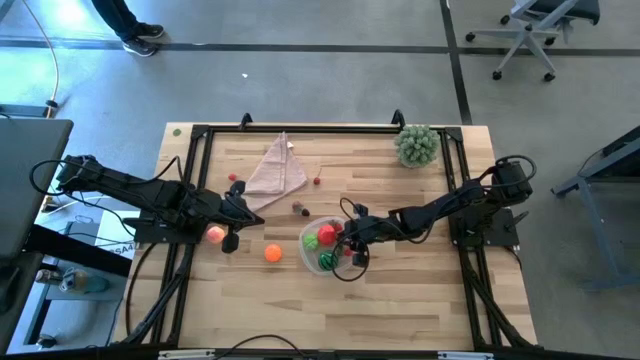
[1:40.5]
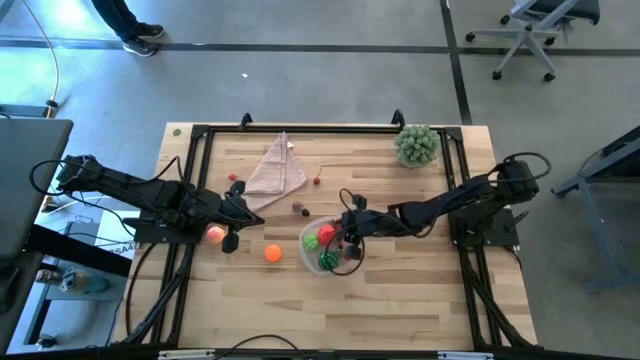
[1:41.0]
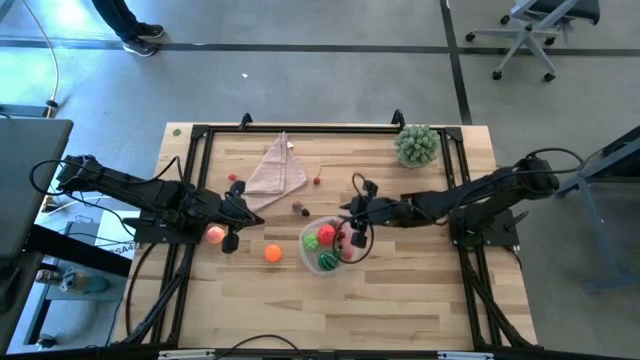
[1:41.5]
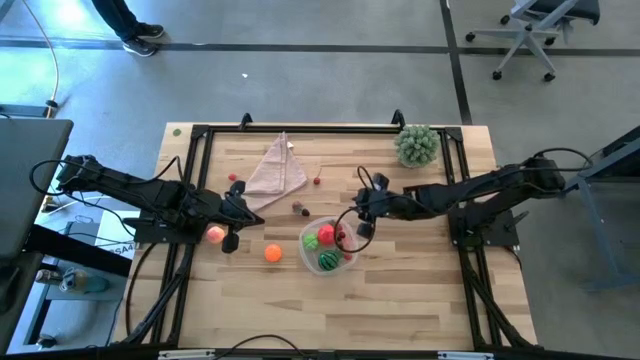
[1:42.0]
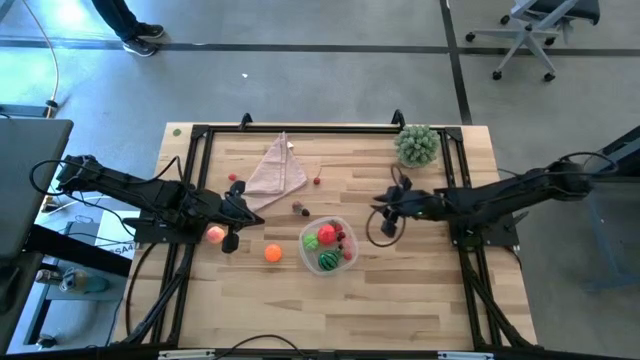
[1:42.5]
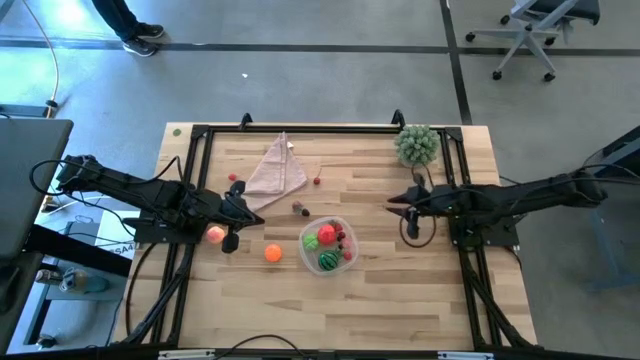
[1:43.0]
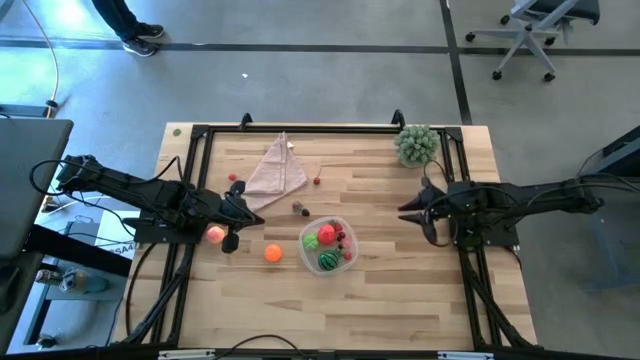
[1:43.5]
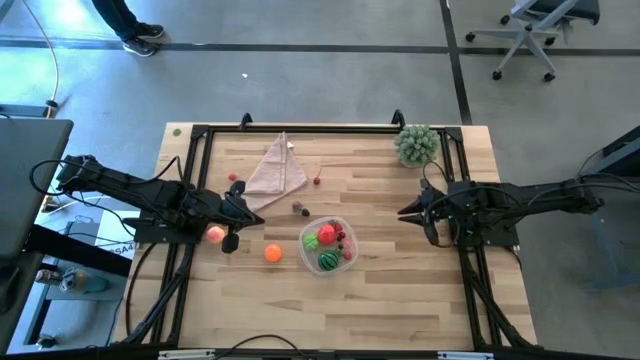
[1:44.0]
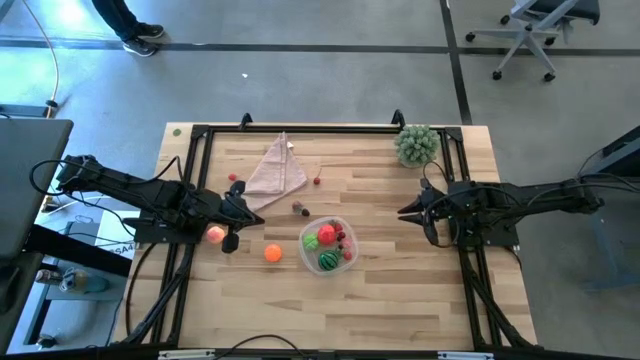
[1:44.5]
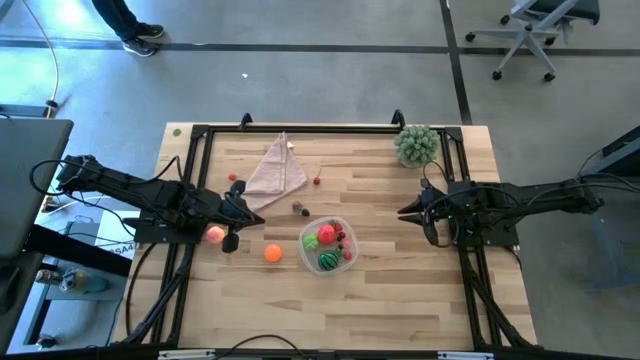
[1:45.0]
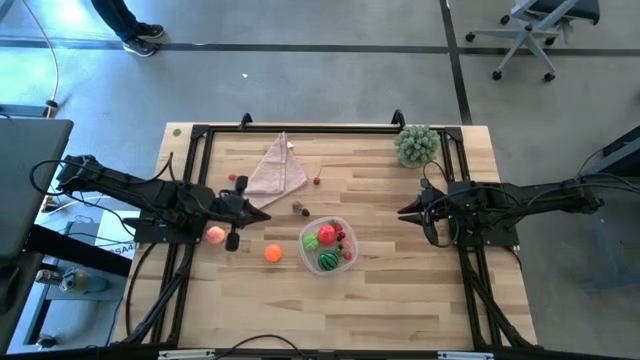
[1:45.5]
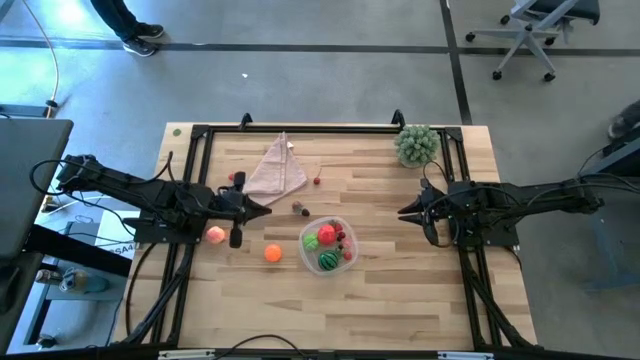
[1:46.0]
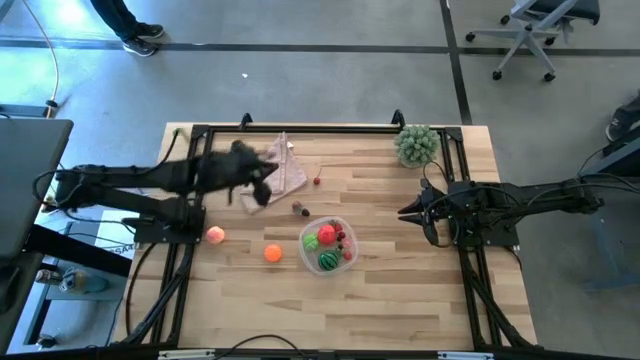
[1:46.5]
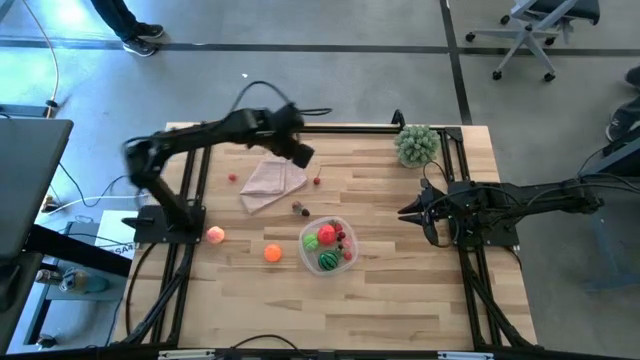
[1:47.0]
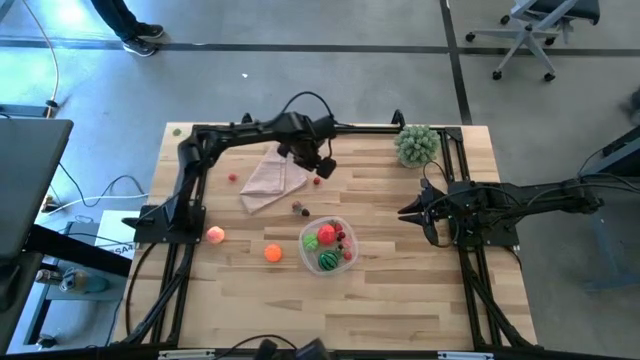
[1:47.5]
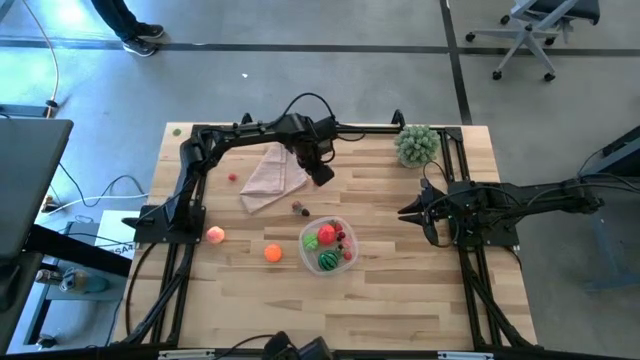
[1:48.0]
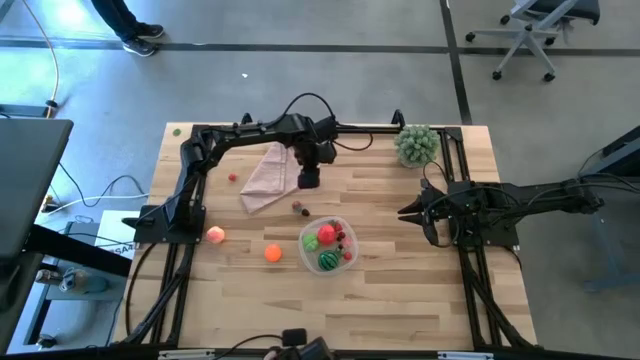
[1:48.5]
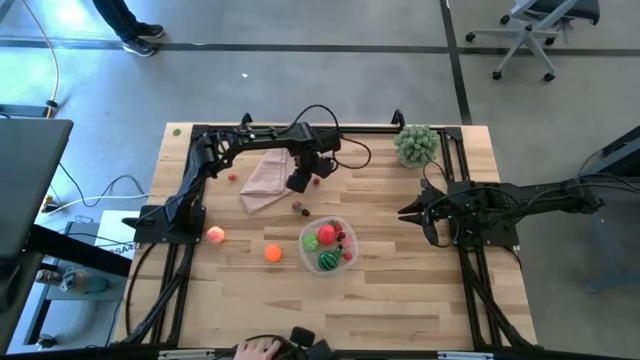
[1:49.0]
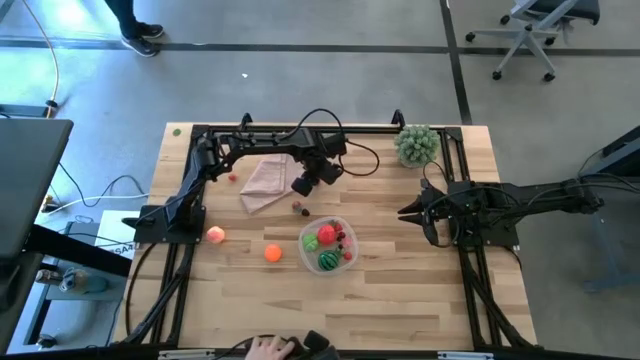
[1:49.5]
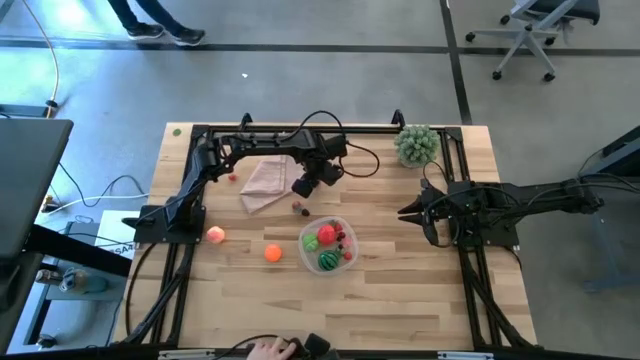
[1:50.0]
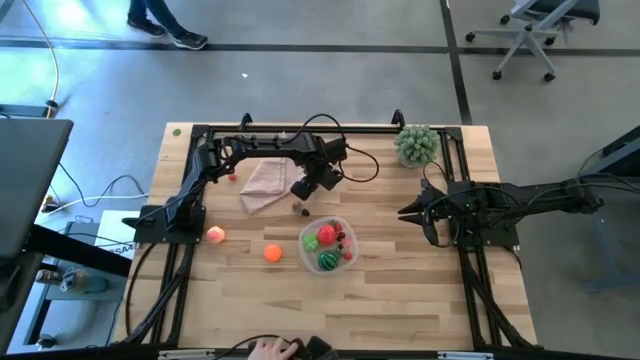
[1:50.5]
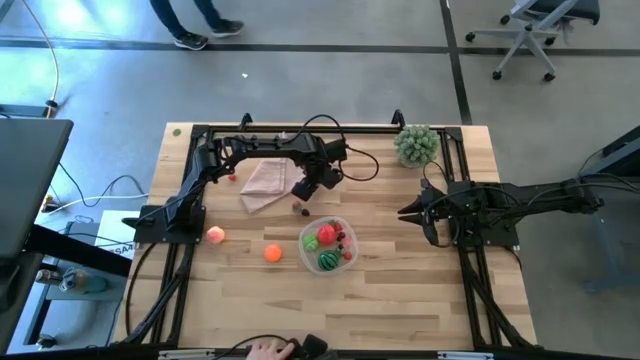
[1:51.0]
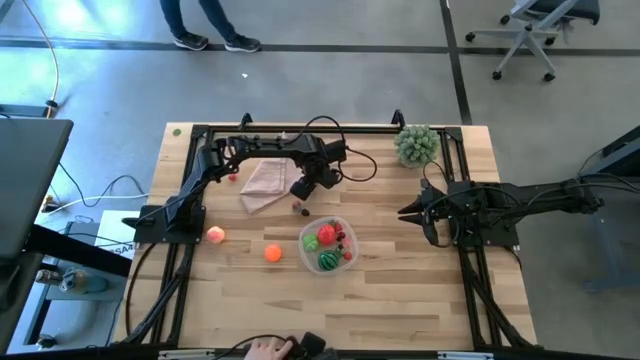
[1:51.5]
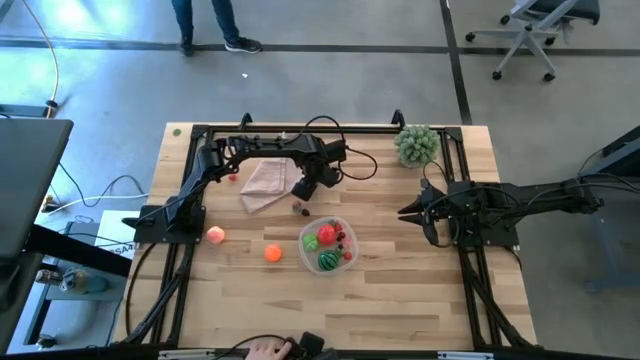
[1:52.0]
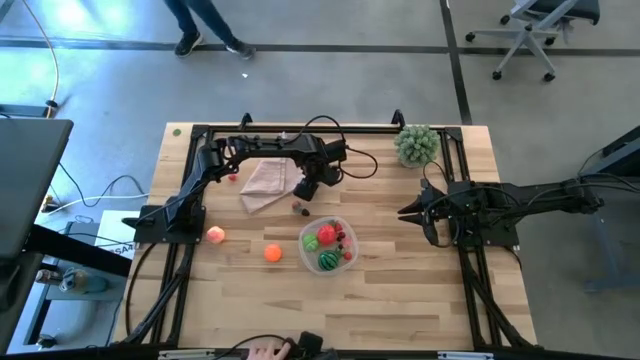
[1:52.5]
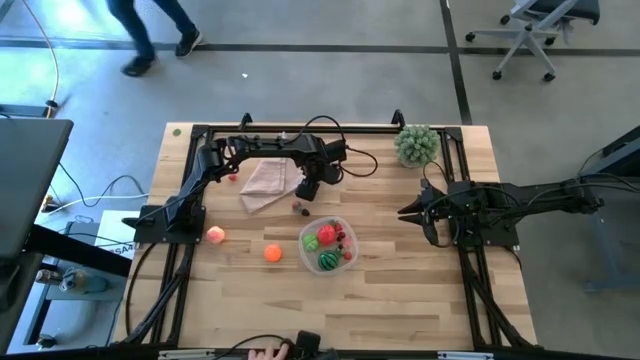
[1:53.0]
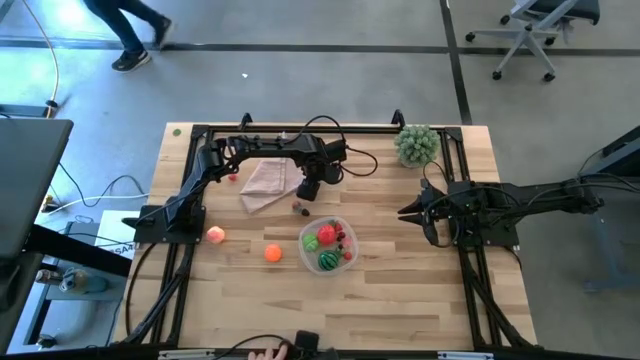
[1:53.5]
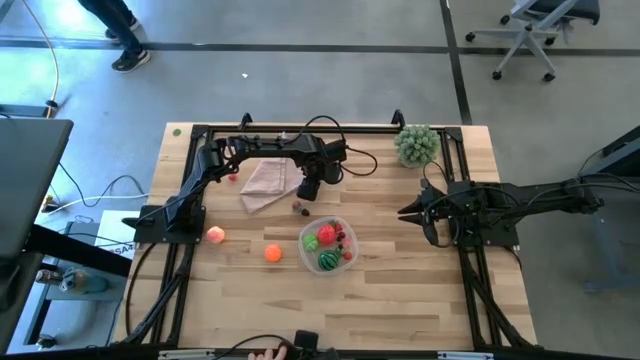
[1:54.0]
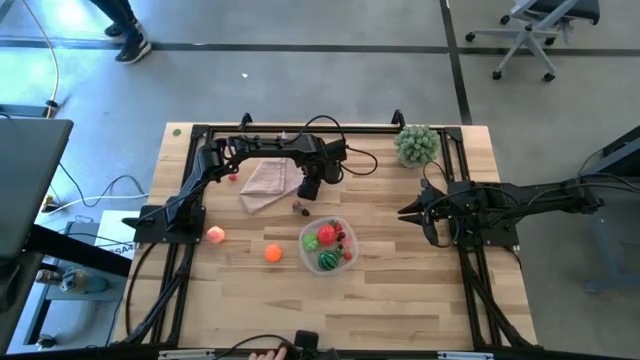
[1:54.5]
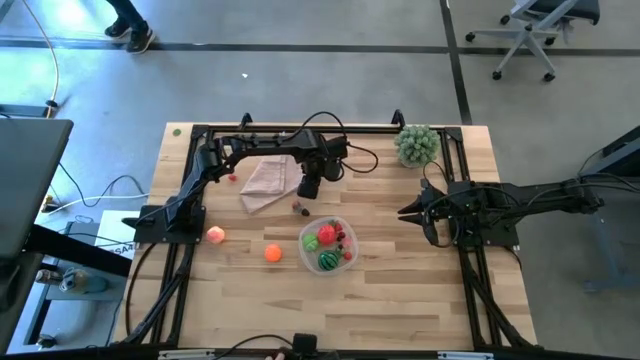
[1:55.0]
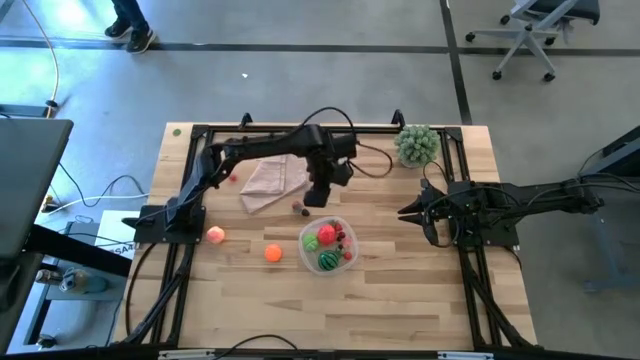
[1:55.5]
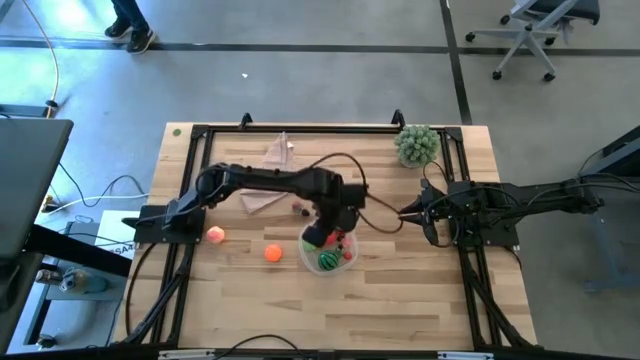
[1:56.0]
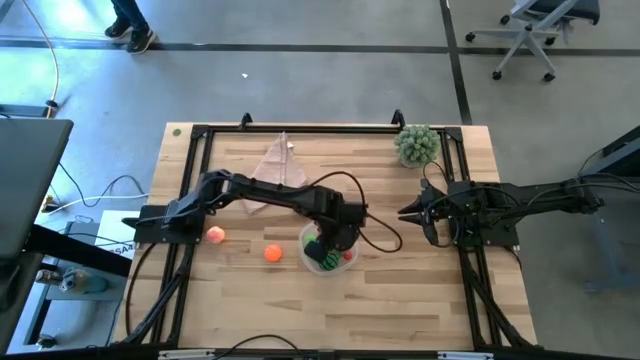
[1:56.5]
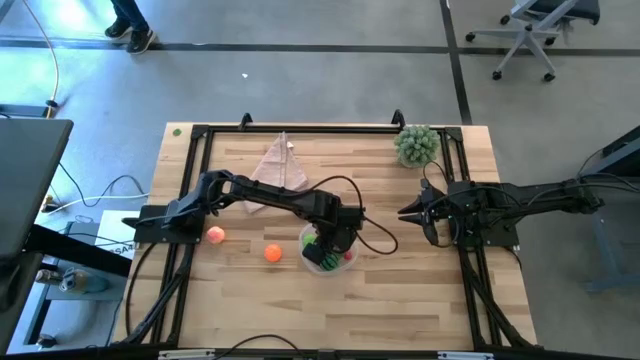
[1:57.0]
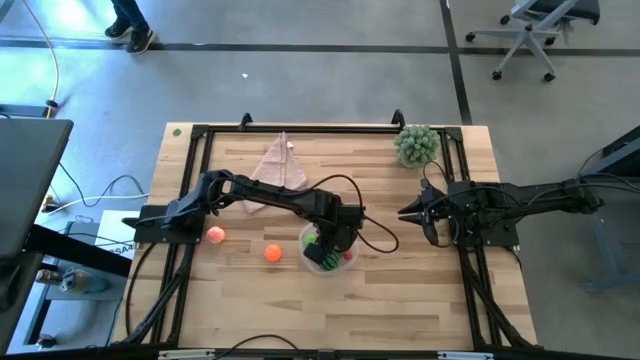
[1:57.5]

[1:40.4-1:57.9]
Task: Pick and placing Produce into tupperware
Put the right cherry into the transparent bin

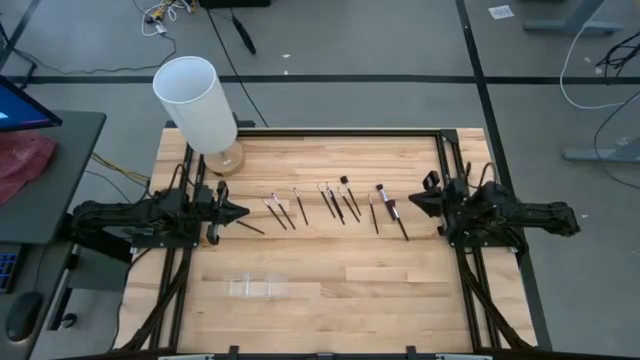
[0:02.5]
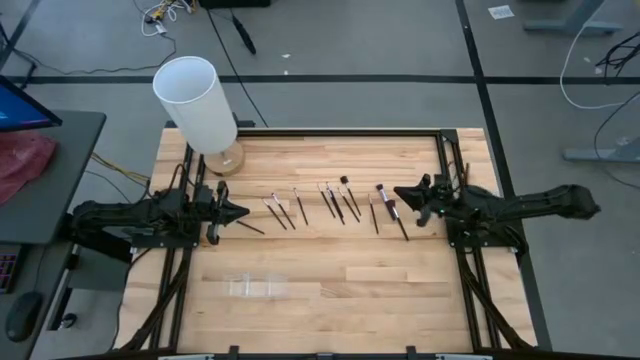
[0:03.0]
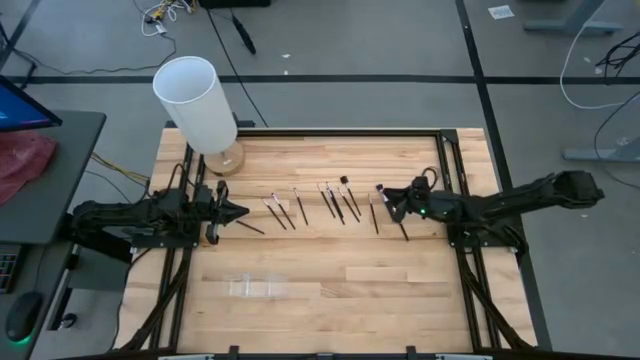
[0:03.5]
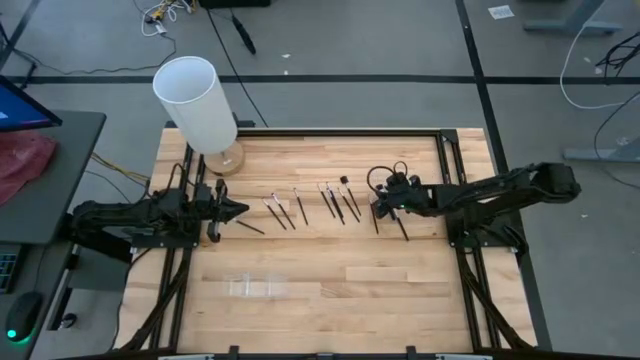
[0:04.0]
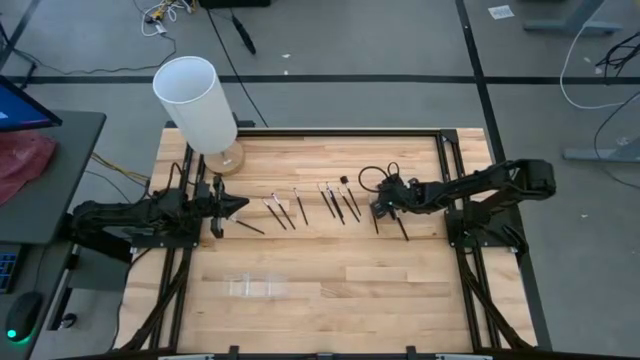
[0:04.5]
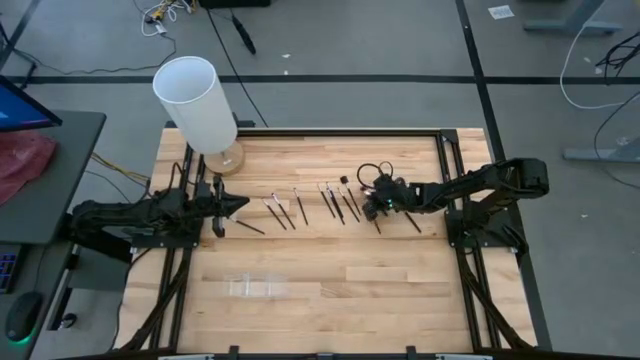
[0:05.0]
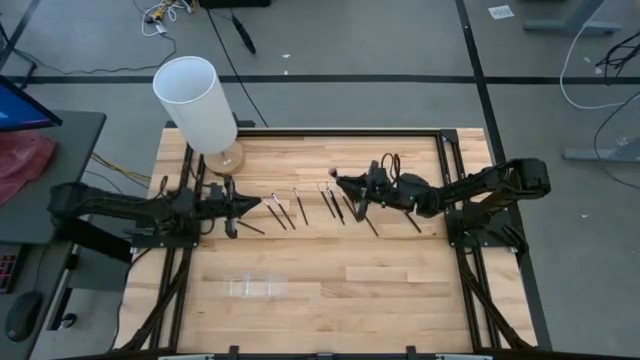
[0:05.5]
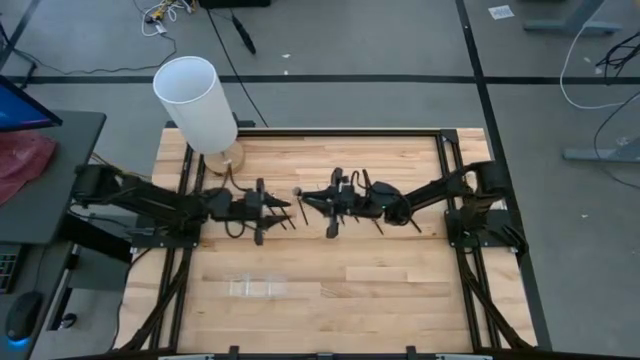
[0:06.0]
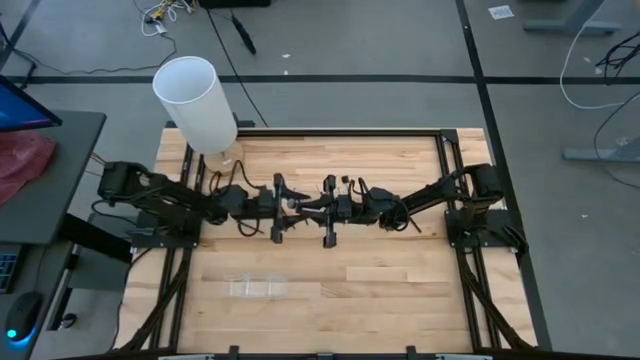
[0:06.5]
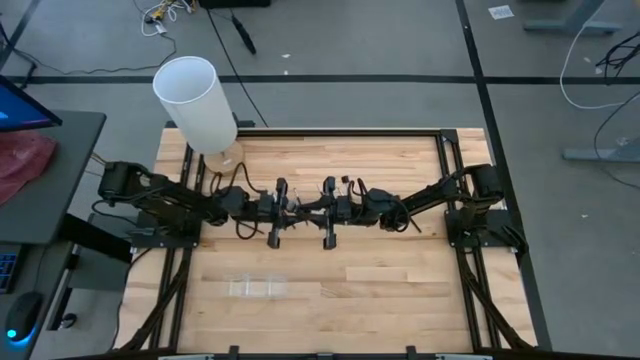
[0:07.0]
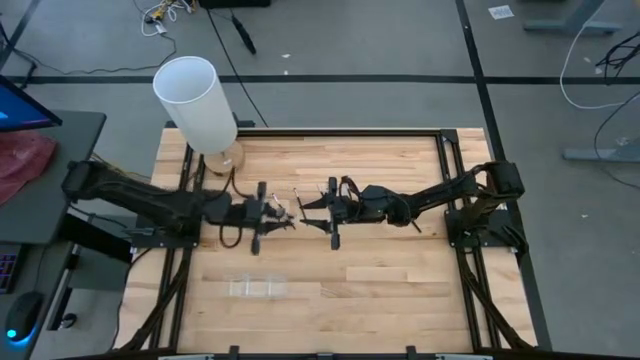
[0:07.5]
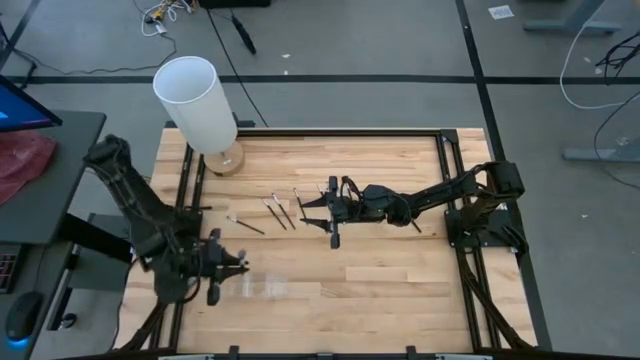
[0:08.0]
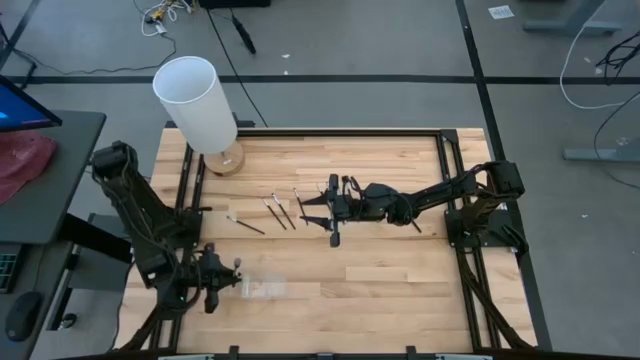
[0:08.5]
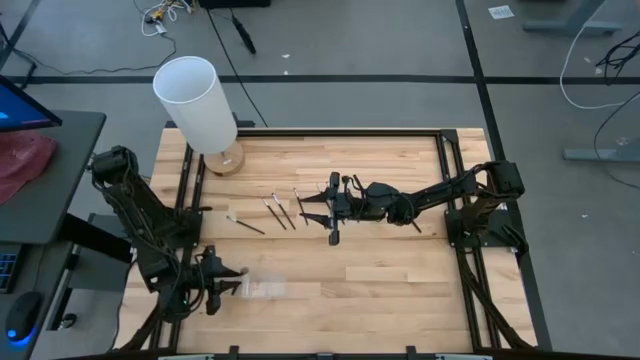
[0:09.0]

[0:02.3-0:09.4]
Task: Put items in baskets/containers
Put the powder brush into the transparent organizer
